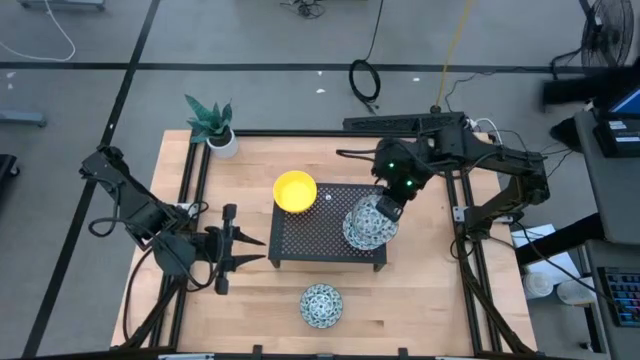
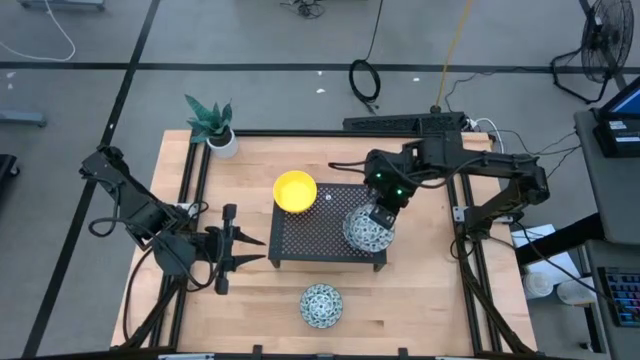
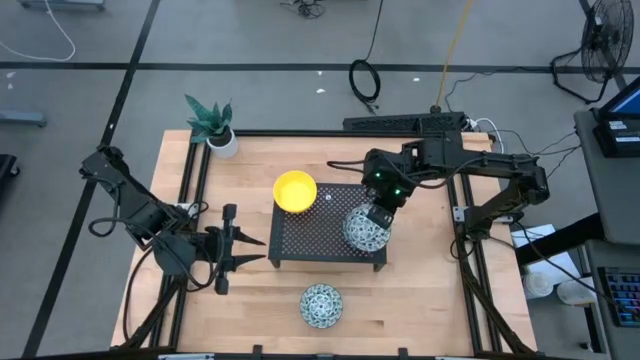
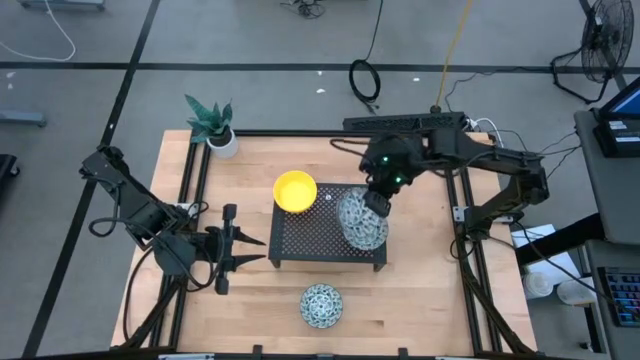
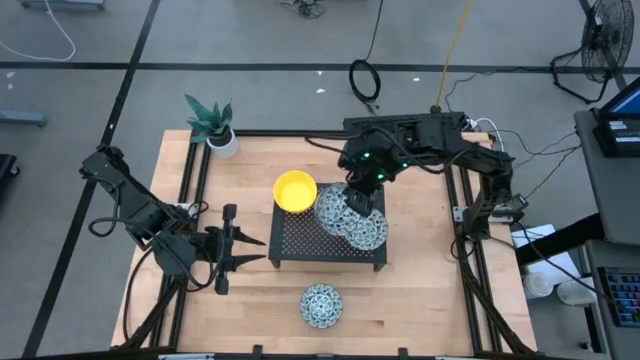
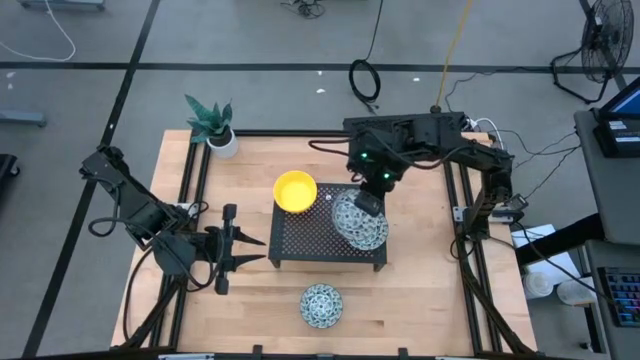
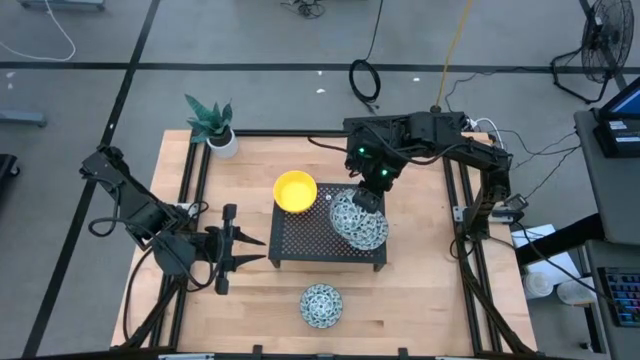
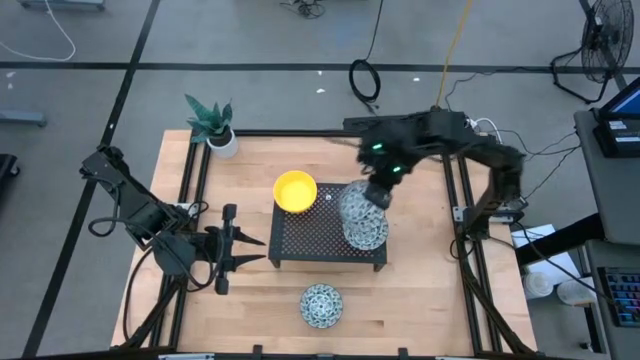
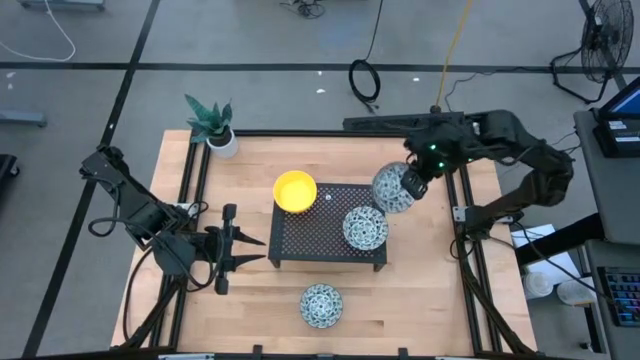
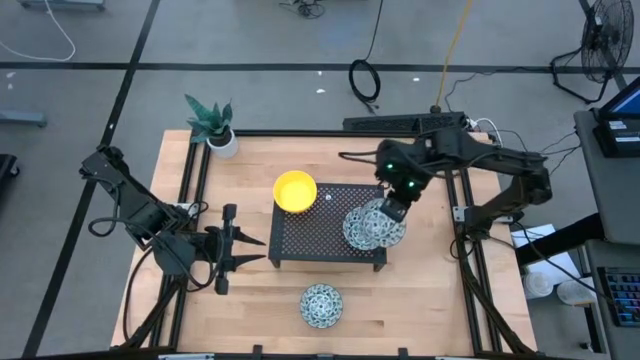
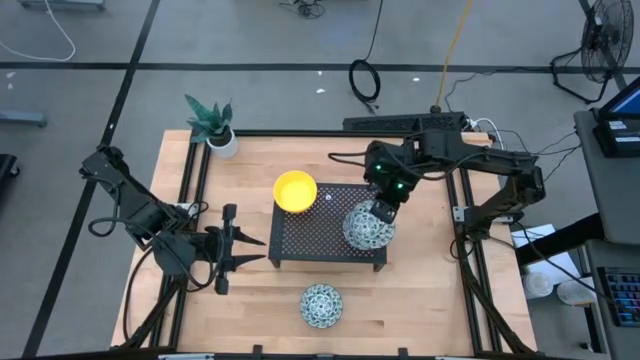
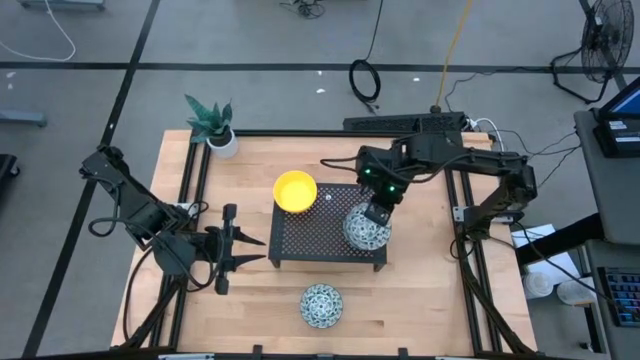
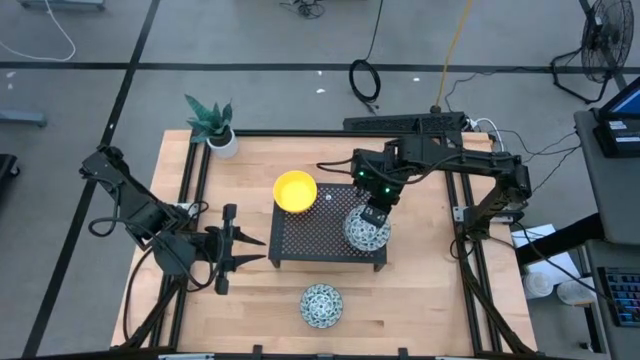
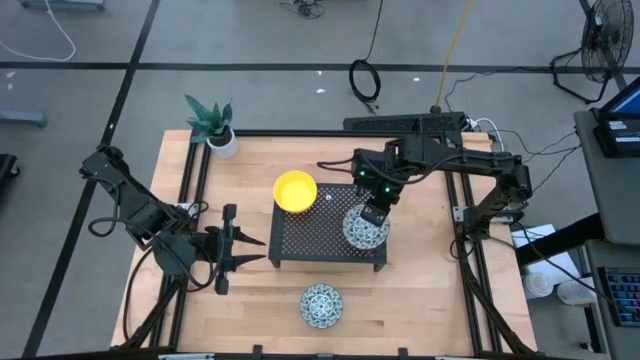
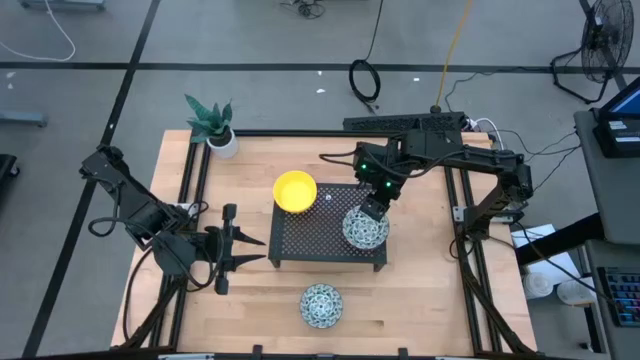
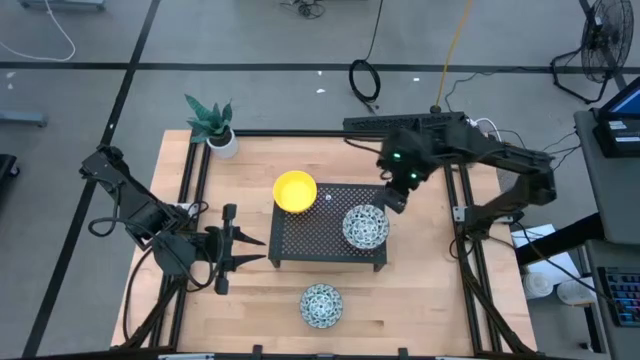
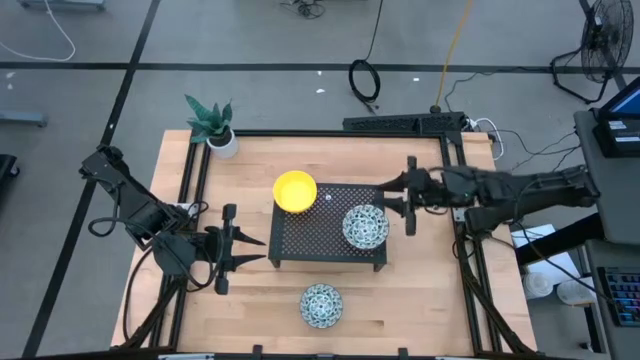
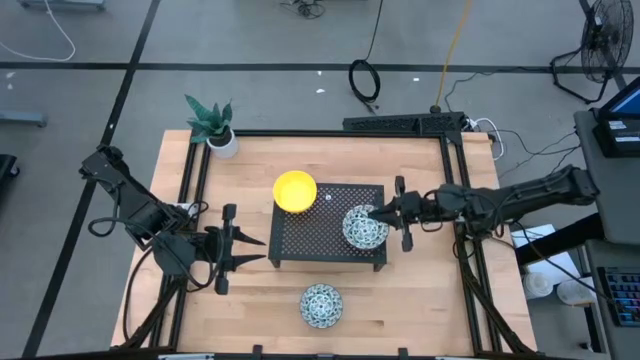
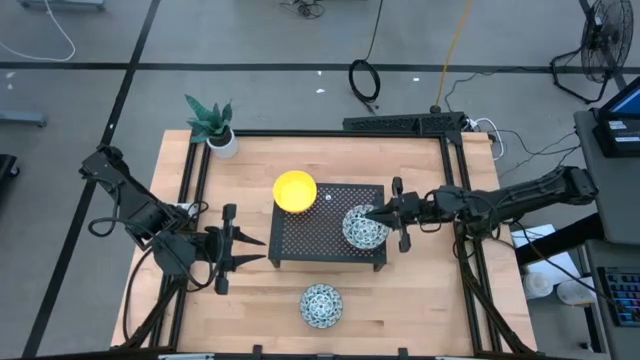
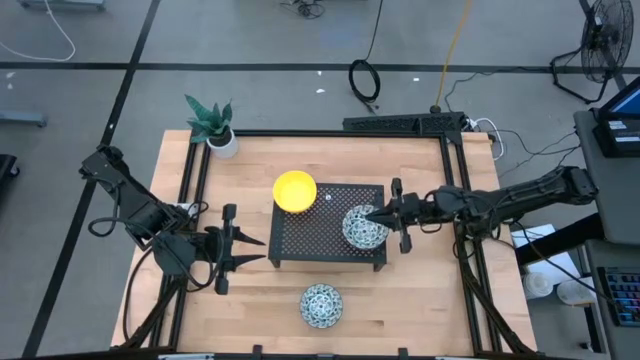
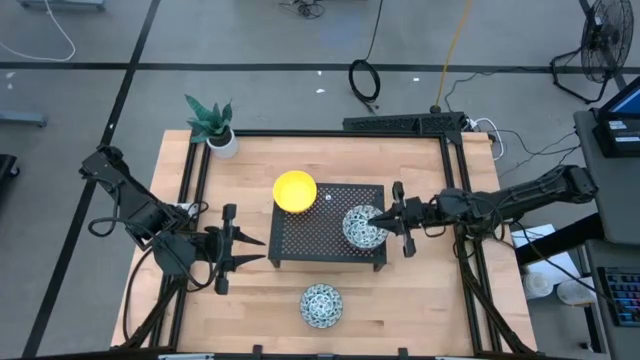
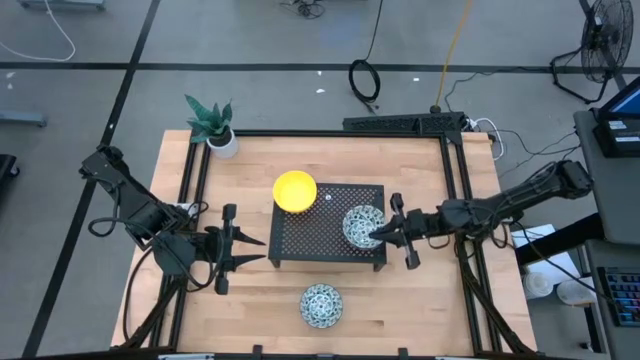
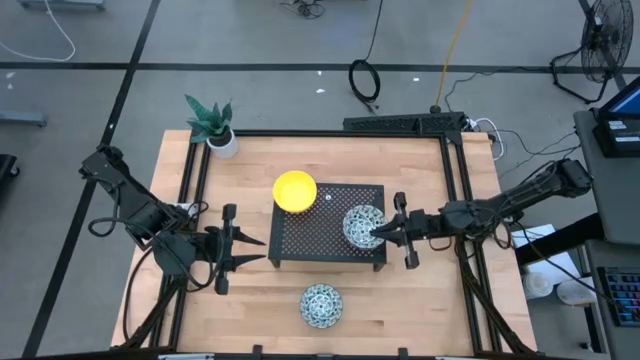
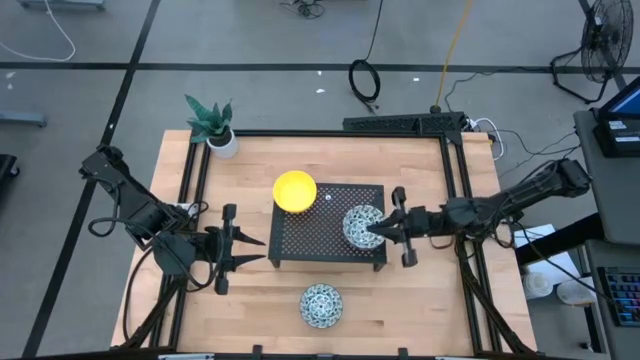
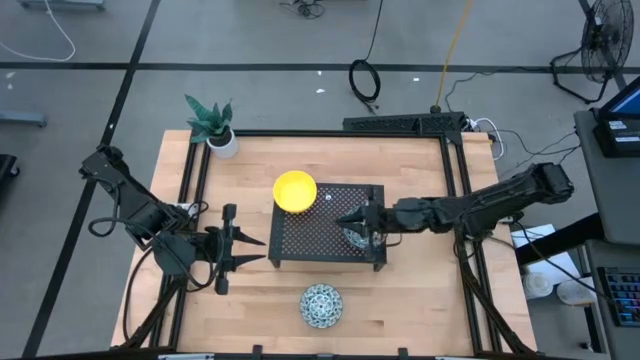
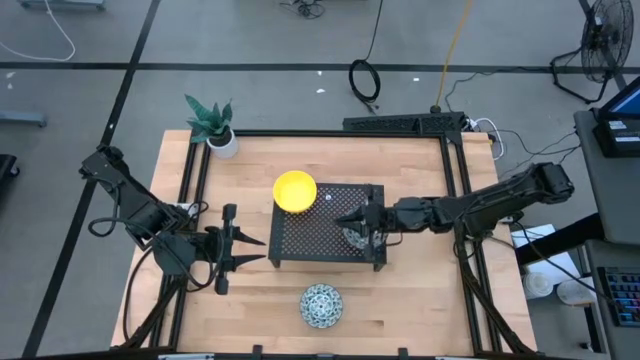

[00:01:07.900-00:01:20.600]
Task: Pick & Place Mini bowls
Stack the left white patterned bowl on top of the white patterned bowl

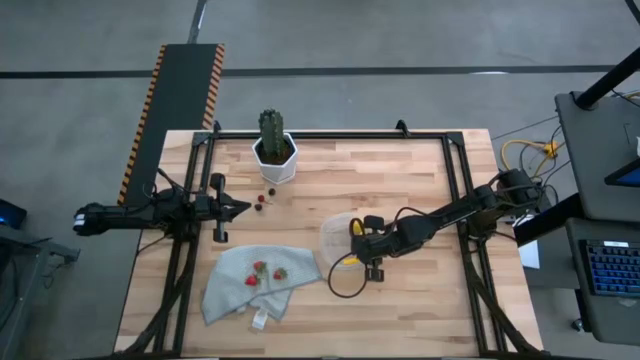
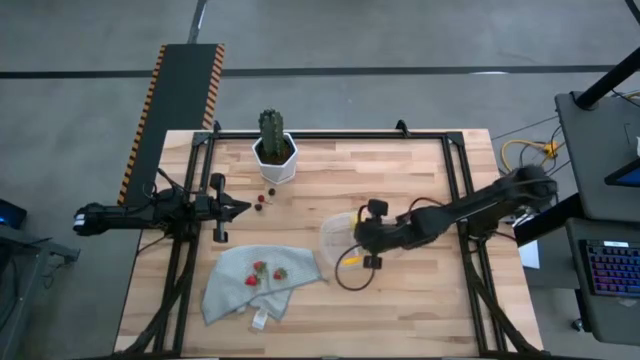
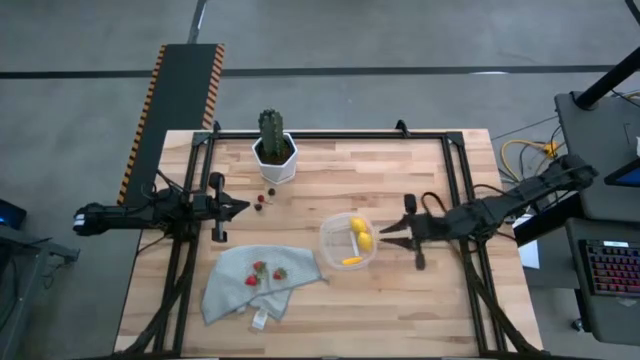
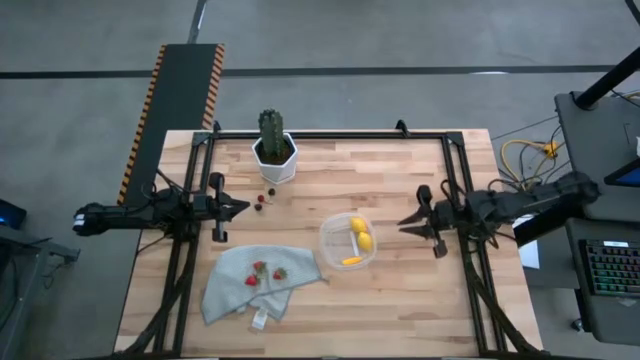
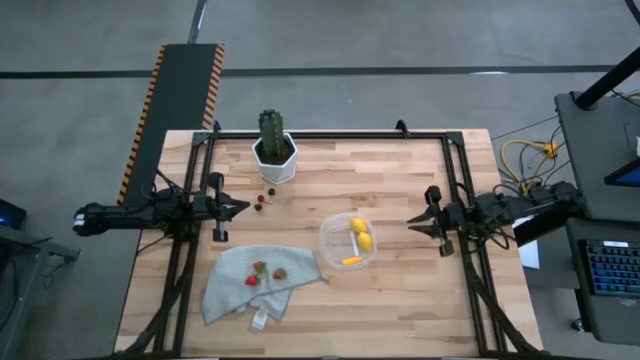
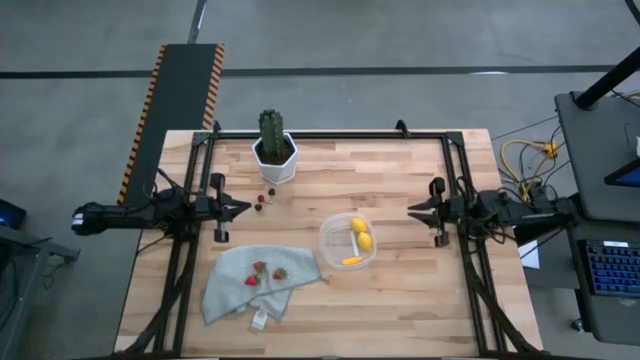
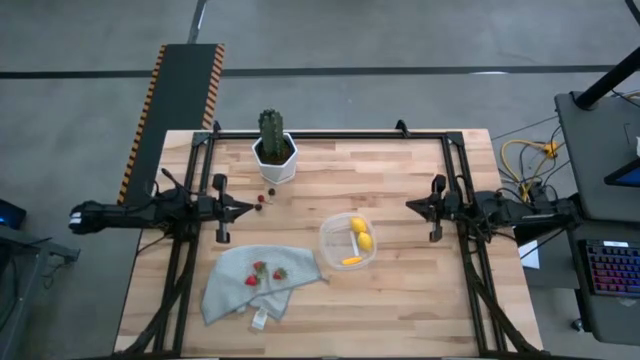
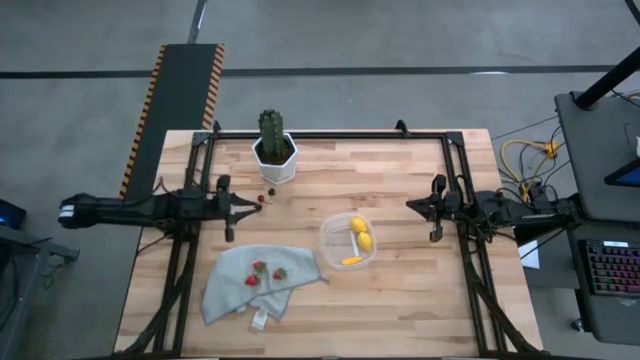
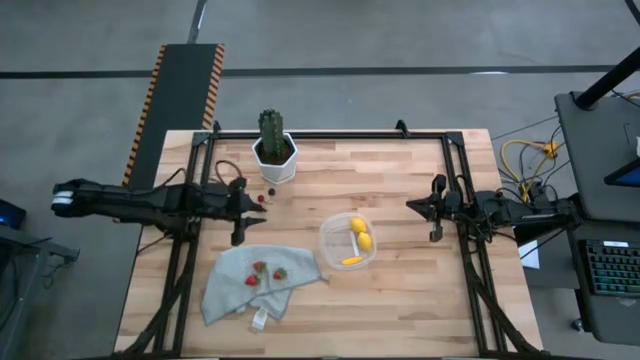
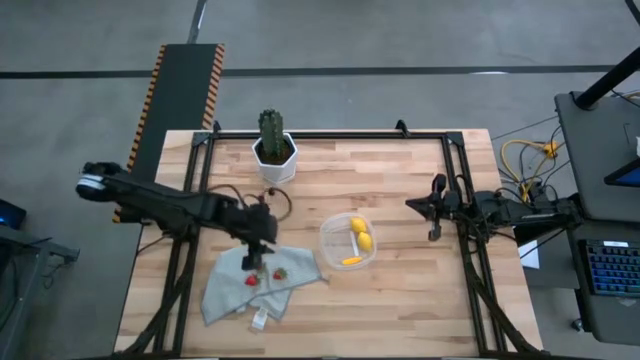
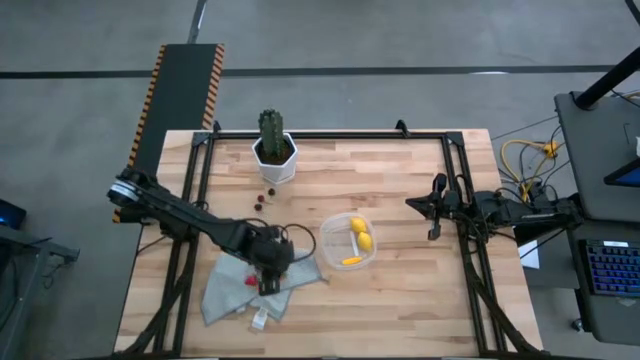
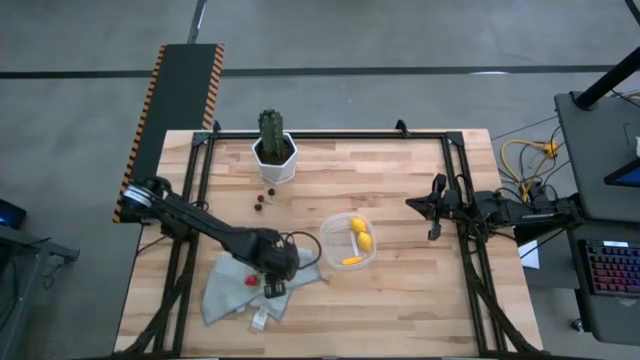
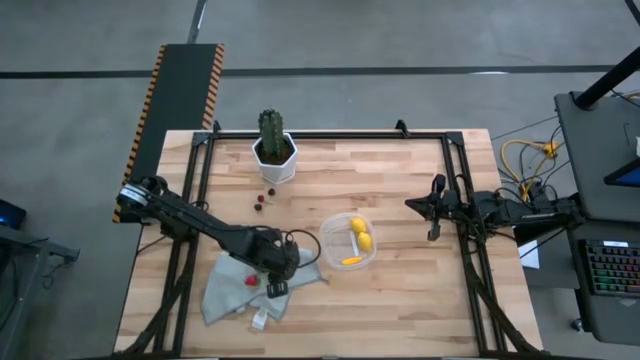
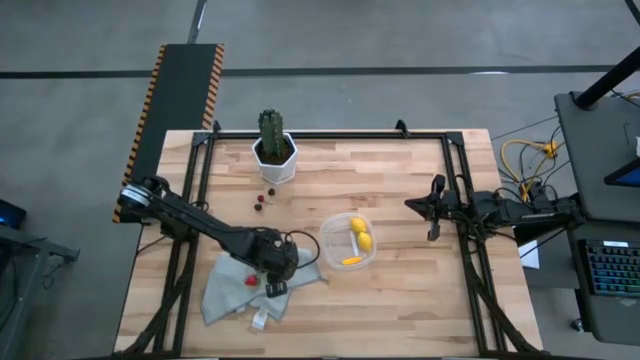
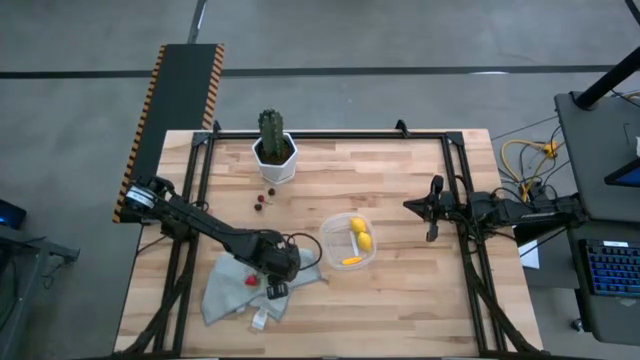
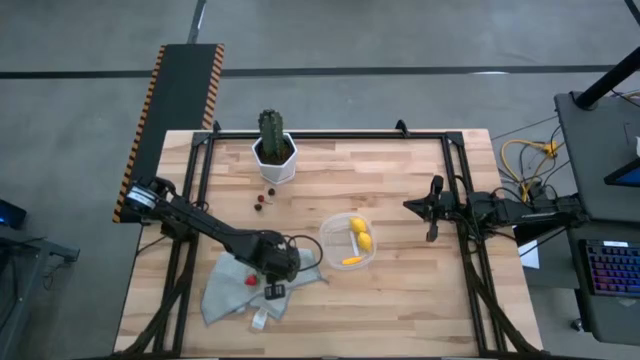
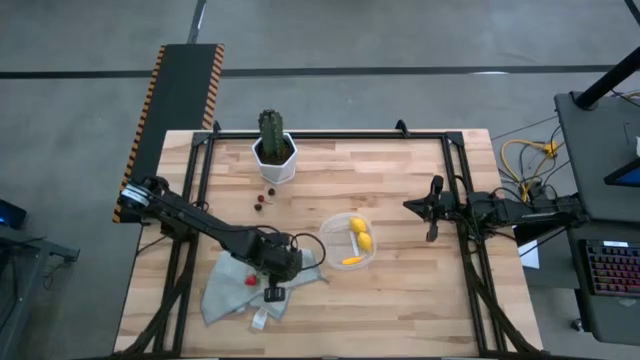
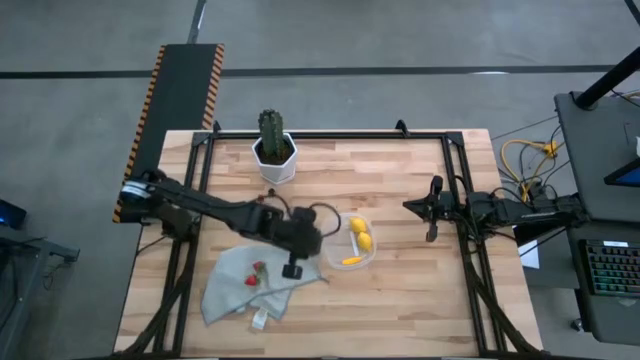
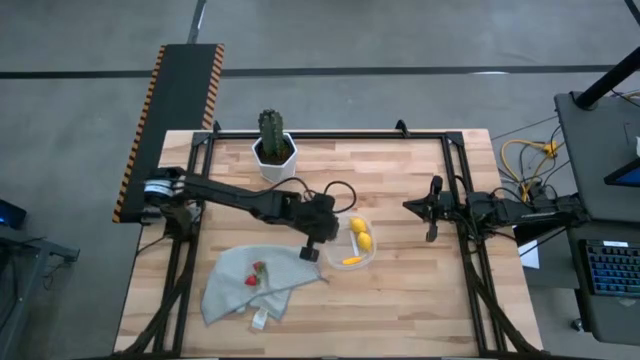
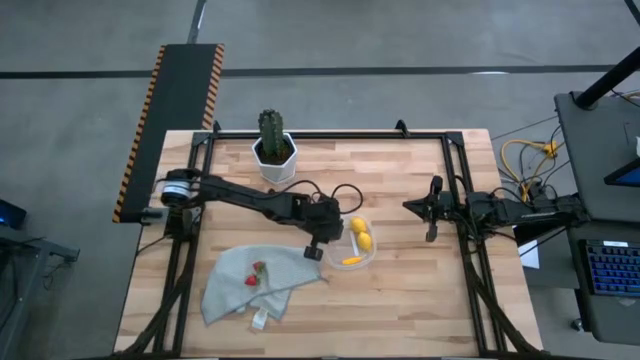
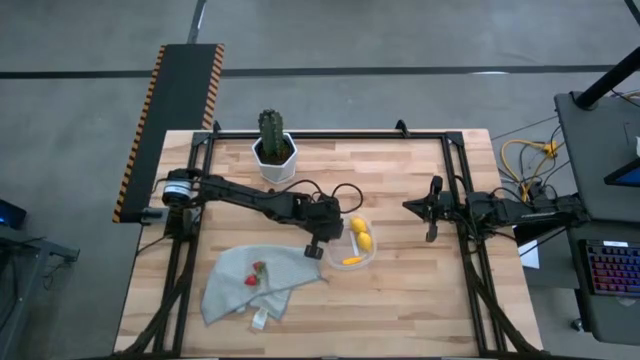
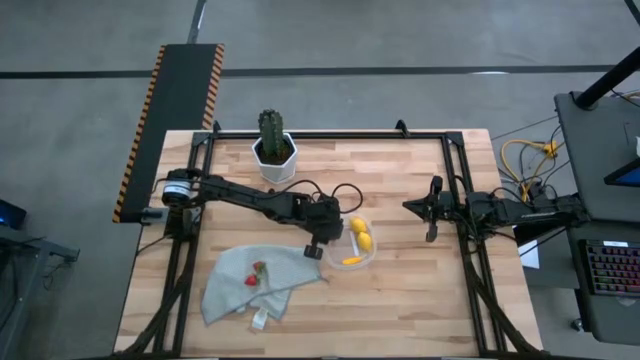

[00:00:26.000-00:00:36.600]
Task: Pick and placing Produce into tupperware
Put the bottom right red strawberry into the transparent container
